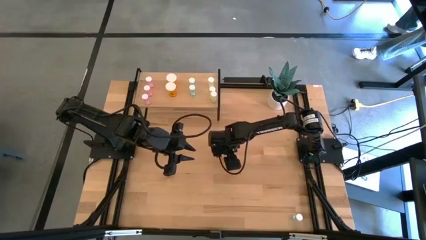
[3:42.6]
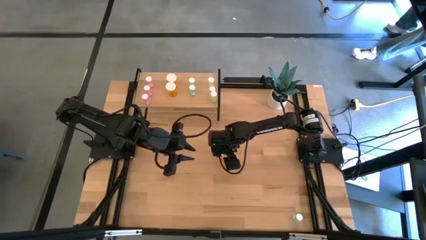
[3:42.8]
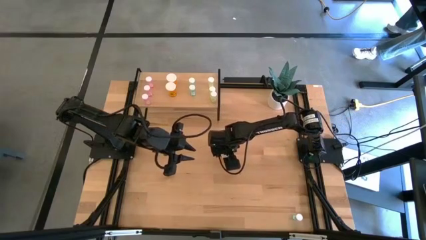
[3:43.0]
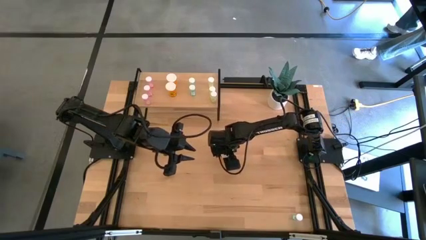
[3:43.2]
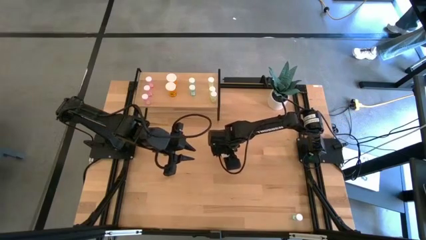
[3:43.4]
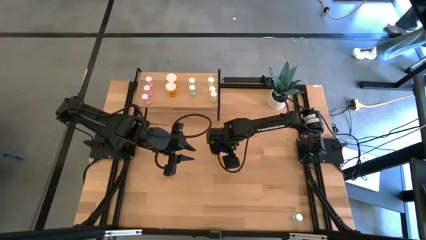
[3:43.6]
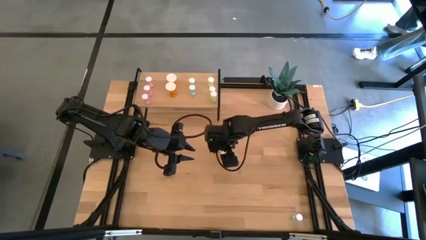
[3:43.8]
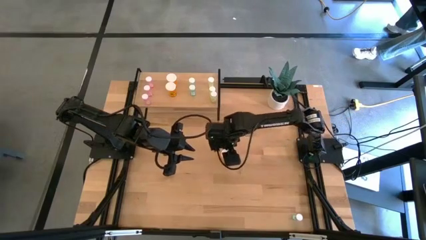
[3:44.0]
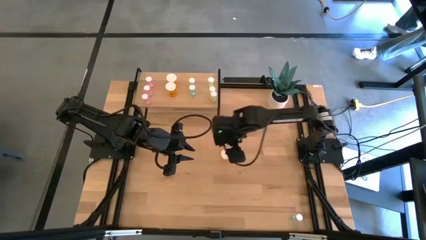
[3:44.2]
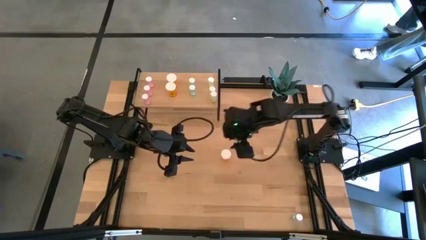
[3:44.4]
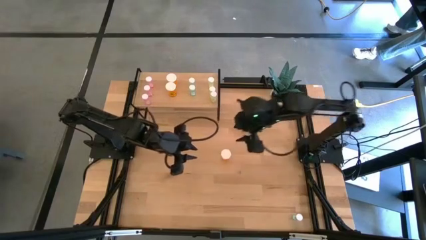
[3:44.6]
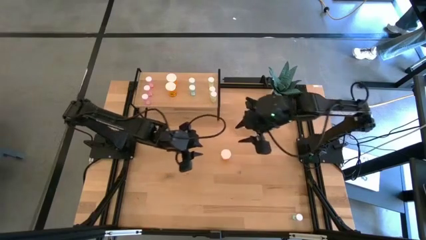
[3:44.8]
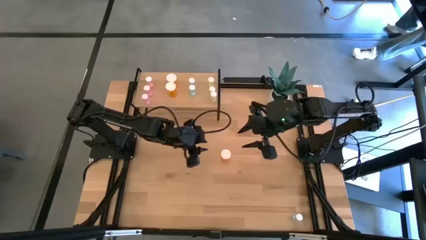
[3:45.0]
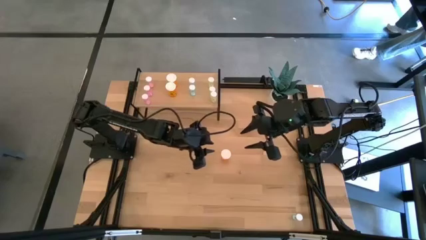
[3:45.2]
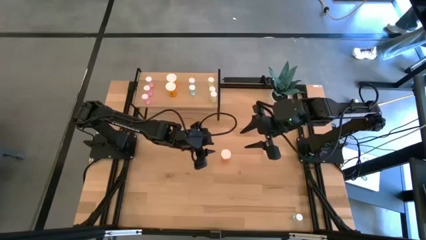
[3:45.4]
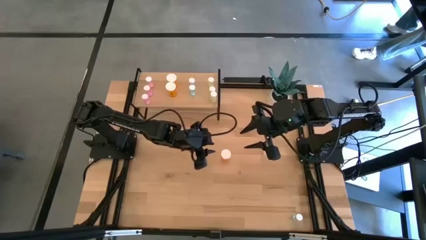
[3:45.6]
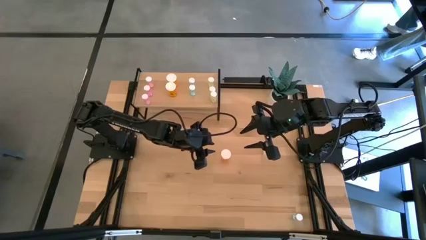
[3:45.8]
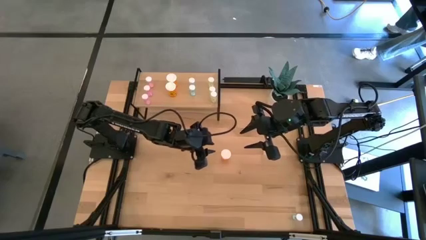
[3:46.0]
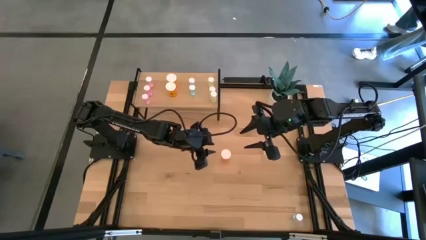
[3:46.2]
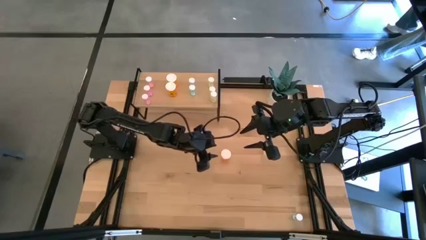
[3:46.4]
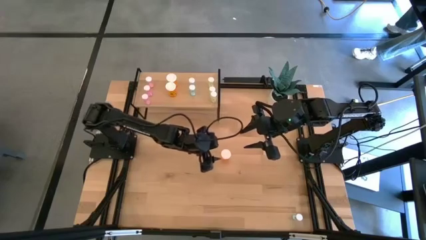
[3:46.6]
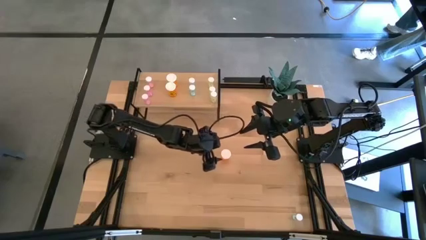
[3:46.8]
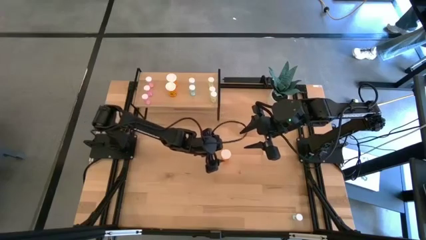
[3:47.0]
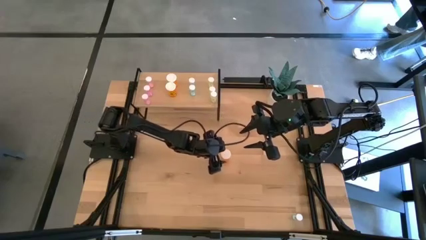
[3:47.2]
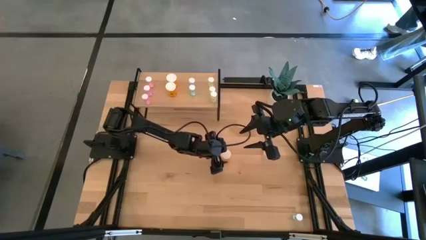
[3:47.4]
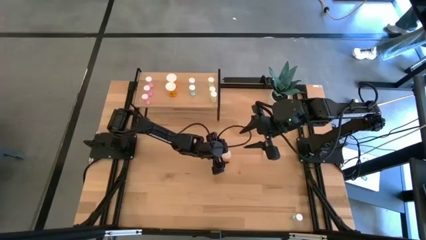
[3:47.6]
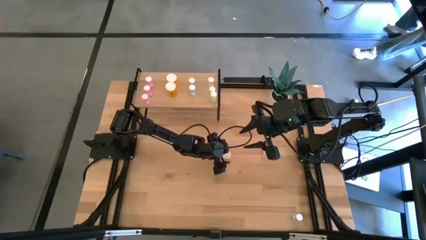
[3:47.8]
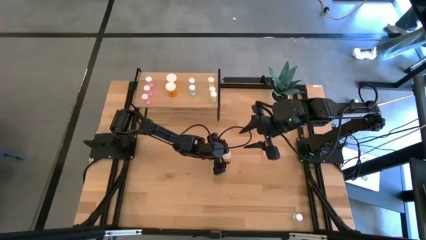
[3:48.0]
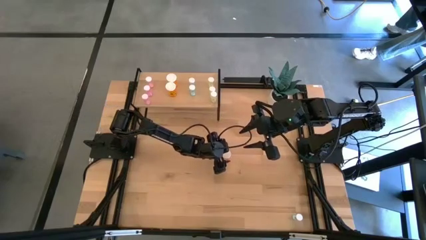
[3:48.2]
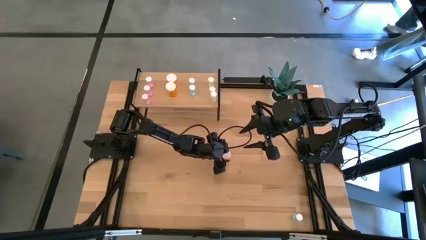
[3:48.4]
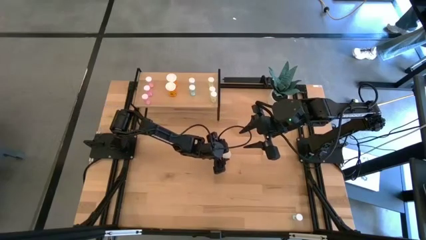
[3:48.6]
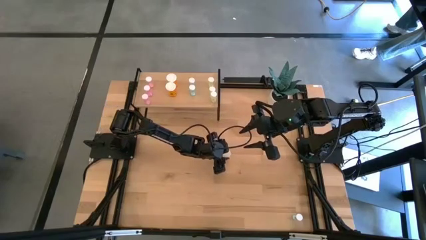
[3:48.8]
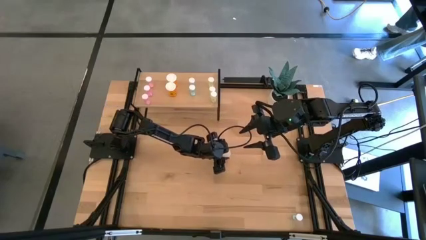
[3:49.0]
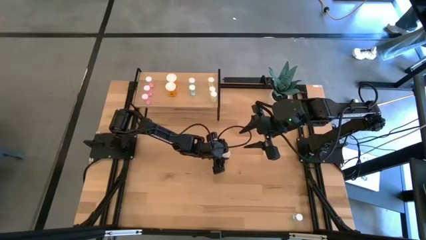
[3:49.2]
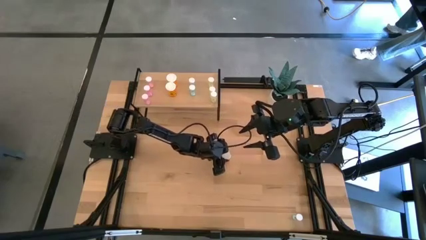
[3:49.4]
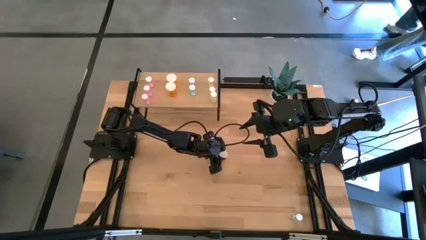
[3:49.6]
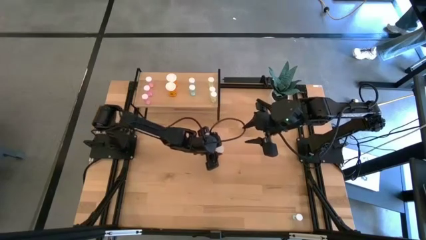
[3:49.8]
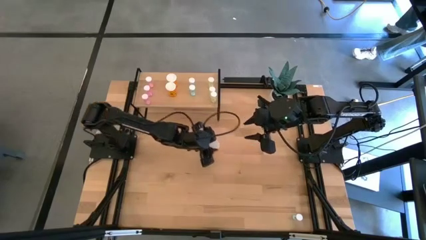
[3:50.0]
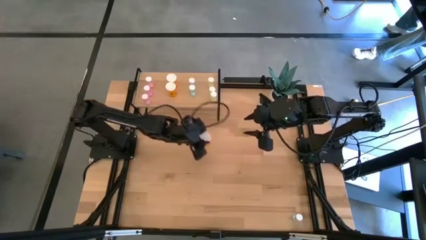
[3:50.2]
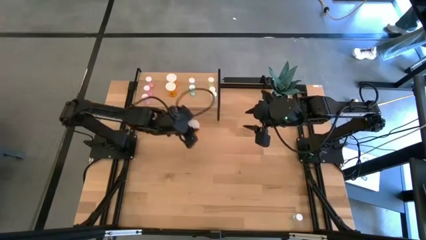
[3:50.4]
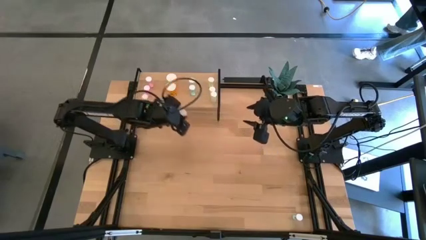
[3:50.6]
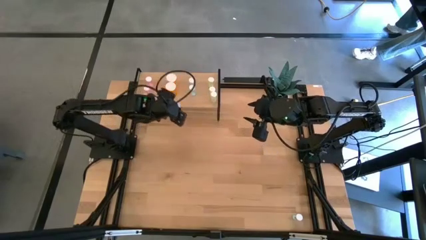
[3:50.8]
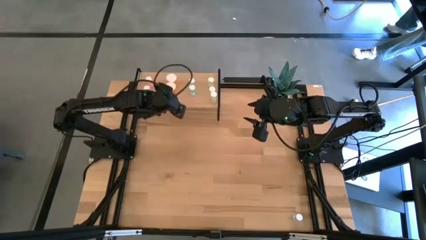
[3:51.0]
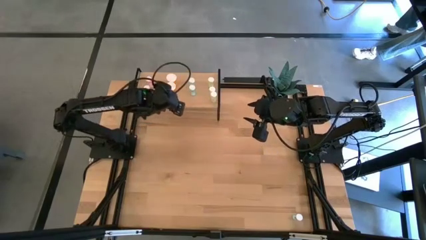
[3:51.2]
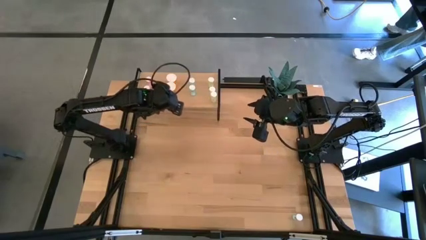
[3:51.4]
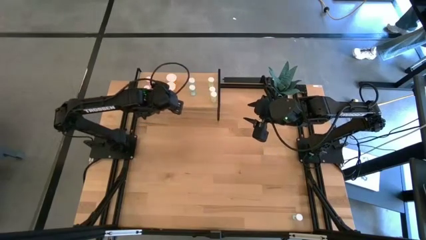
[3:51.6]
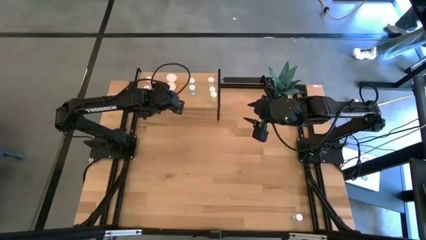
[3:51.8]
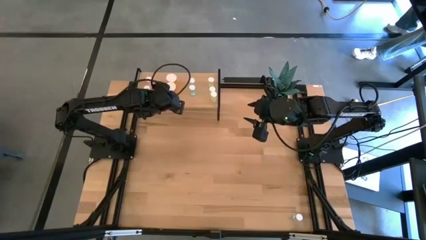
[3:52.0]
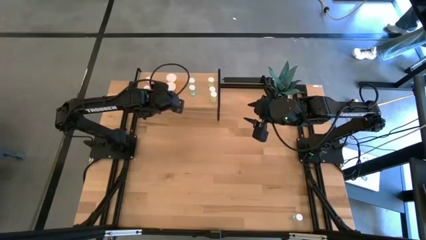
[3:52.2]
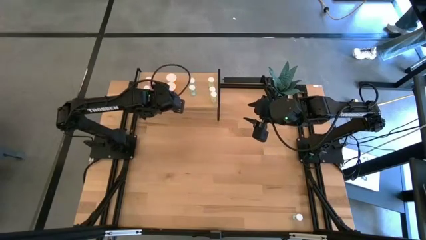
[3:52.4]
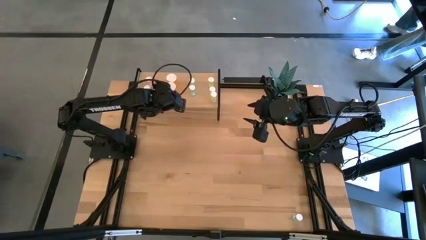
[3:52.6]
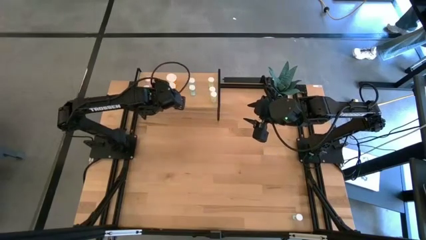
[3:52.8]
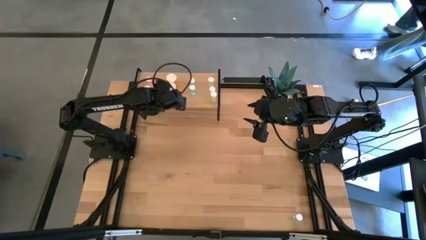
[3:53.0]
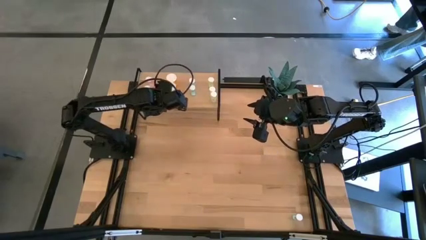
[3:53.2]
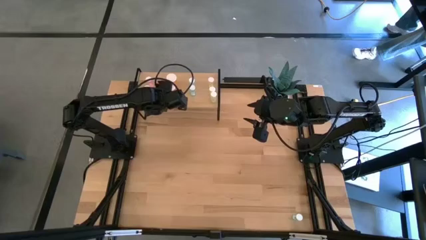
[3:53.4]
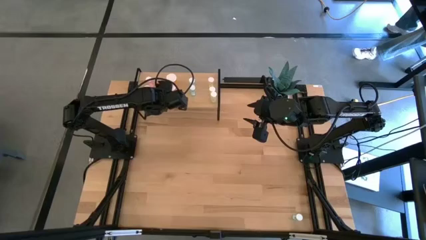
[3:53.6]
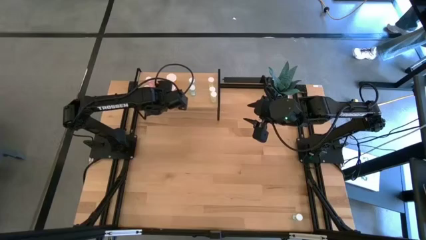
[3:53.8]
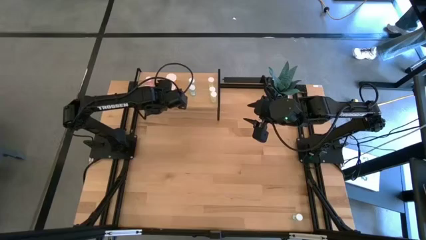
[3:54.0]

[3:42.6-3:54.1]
Task: Pick and place medicine bottles onto shelf by color
Put the orange pill bottle on the shelf aligned with the other orange pill bottles
